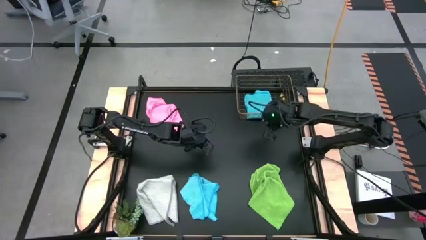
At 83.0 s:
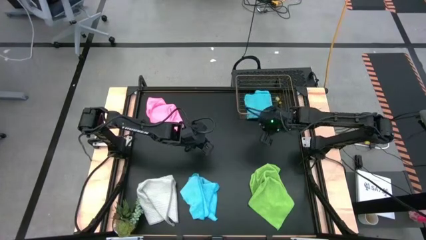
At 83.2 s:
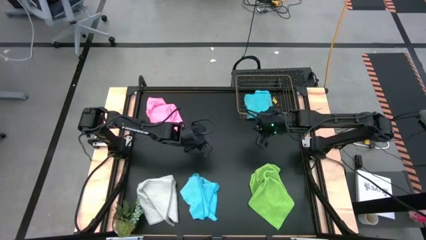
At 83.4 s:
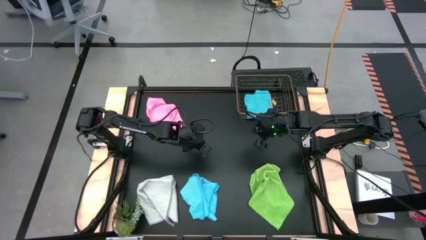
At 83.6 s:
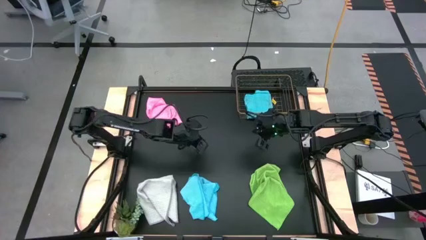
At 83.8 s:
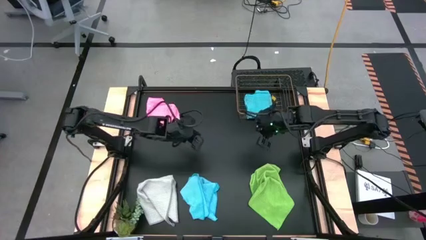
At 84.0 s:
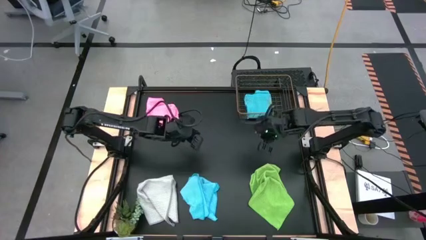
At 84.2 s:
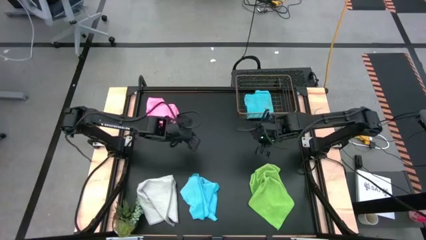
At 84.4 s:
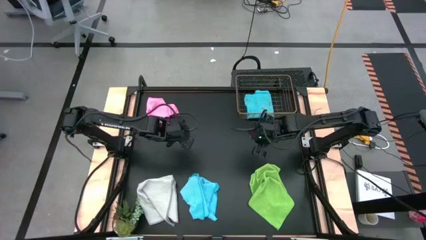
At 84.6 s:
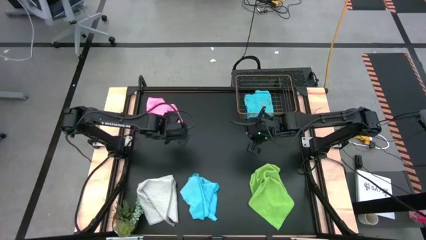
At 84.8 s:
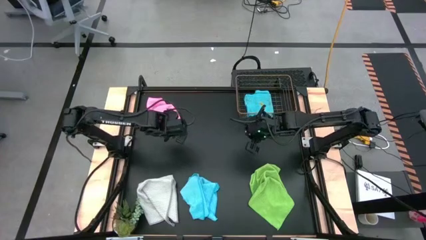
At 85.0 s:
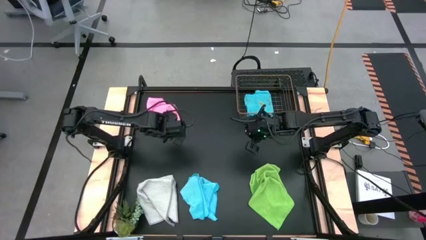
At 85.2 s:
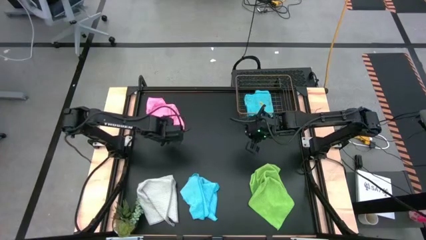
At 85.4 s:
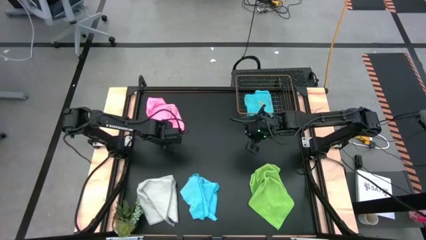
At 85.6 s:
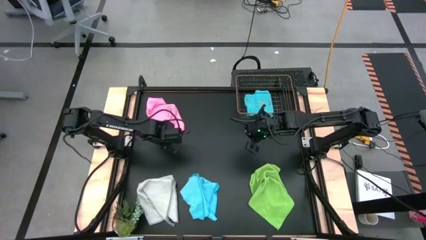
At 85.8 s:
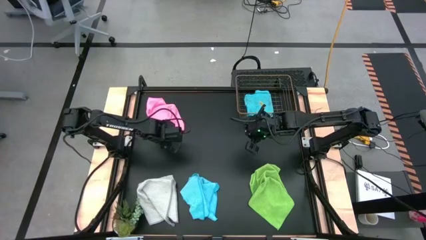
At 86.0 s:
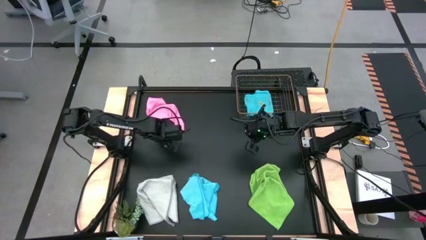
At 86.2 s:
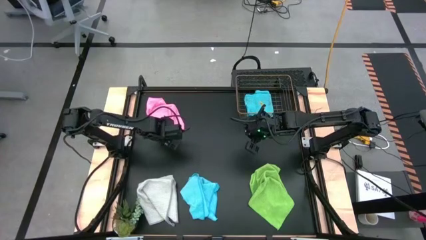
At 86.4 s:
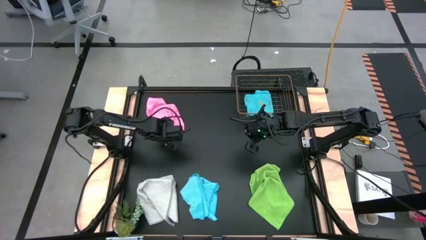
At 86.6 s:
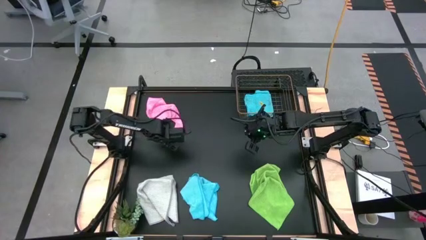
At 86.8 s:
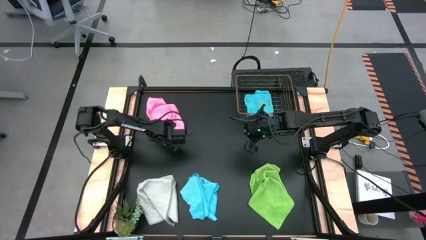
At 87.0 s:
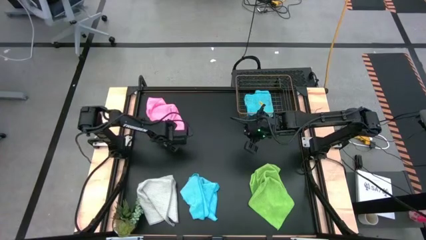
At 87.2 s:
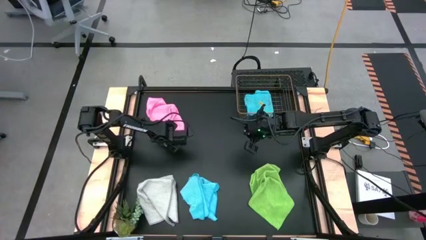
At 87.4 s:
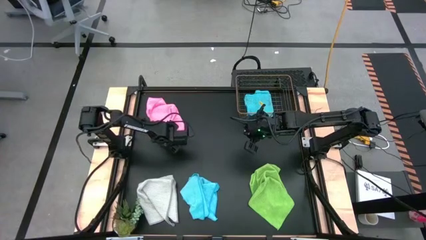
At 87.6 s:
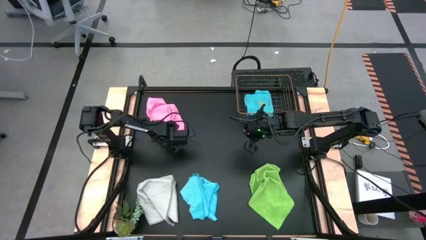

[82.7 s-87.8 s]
Task: Fold microfiber towels
Fold the pink towel

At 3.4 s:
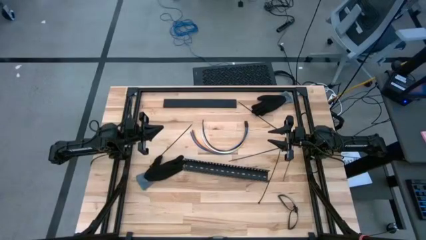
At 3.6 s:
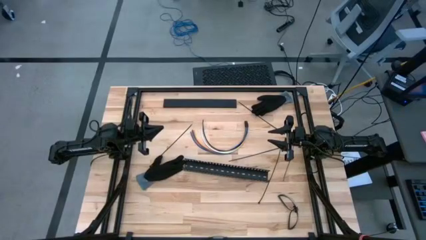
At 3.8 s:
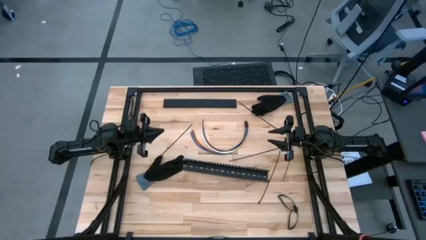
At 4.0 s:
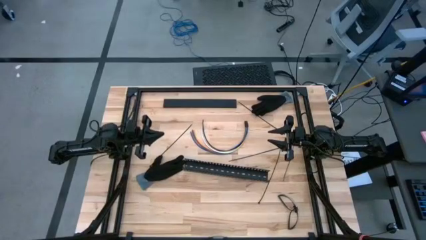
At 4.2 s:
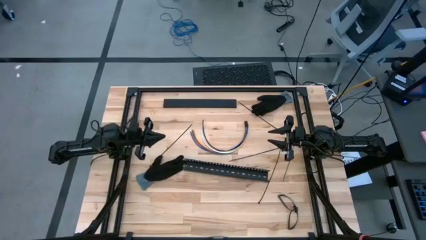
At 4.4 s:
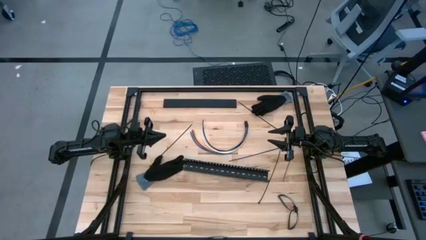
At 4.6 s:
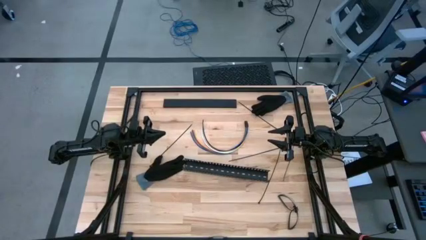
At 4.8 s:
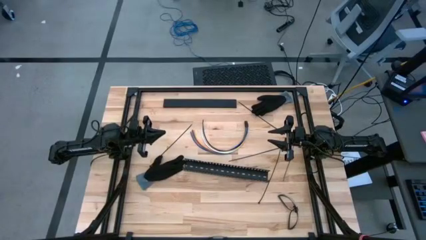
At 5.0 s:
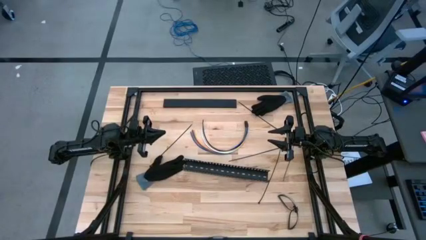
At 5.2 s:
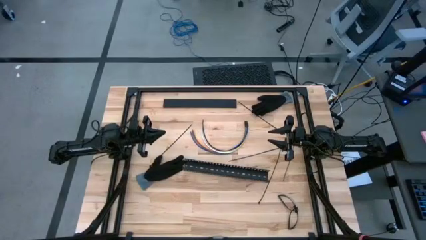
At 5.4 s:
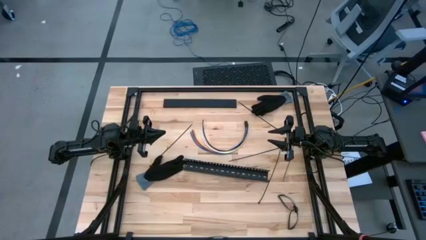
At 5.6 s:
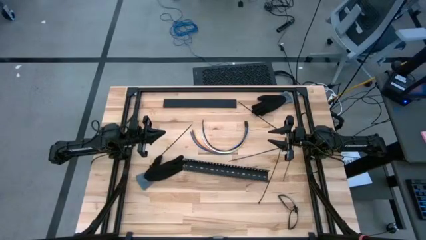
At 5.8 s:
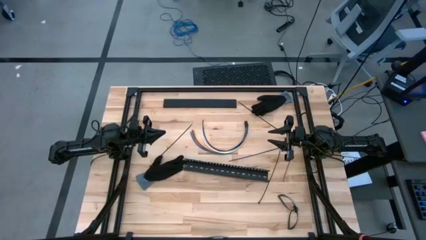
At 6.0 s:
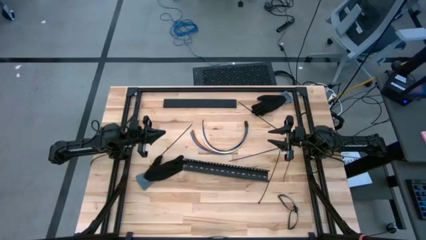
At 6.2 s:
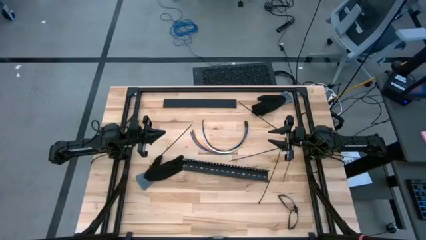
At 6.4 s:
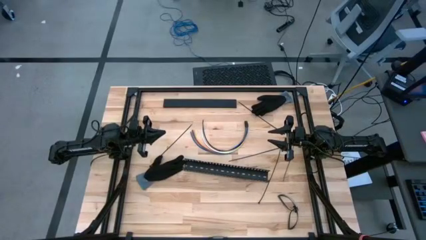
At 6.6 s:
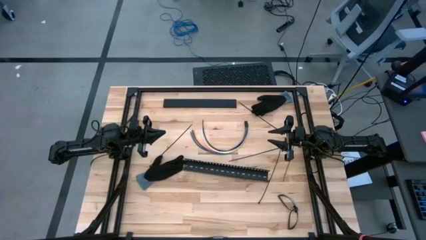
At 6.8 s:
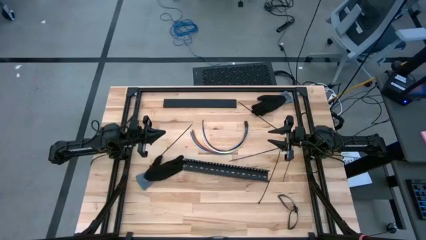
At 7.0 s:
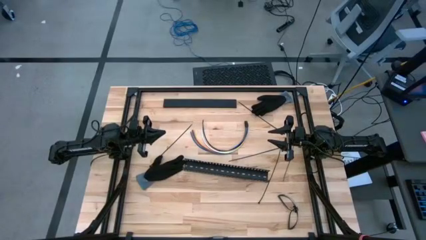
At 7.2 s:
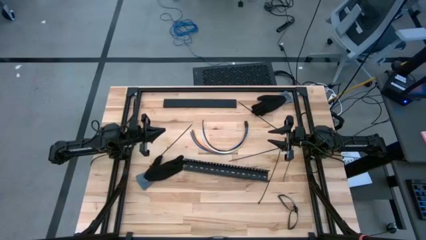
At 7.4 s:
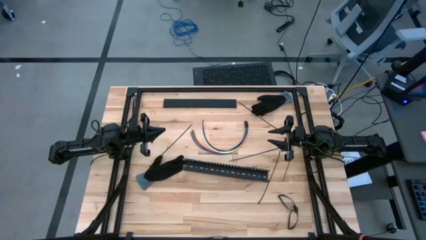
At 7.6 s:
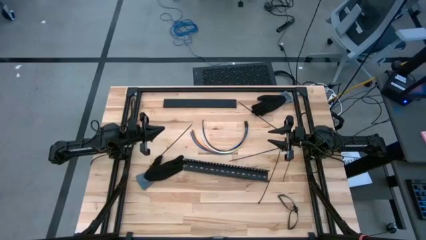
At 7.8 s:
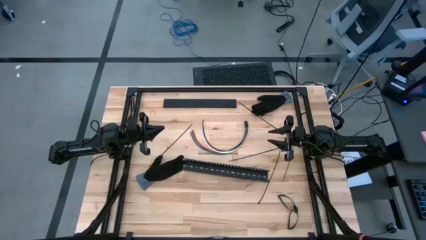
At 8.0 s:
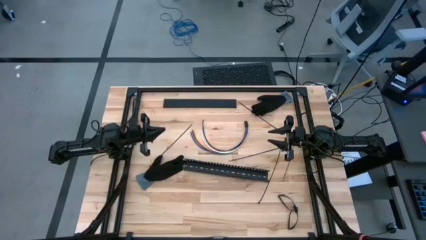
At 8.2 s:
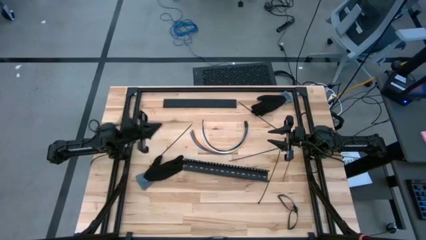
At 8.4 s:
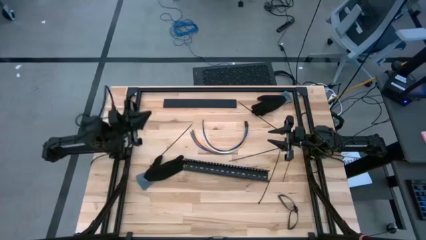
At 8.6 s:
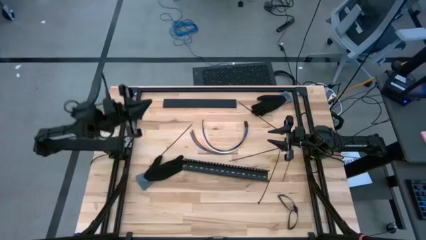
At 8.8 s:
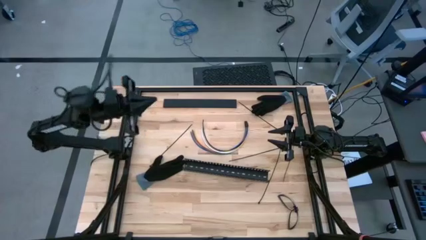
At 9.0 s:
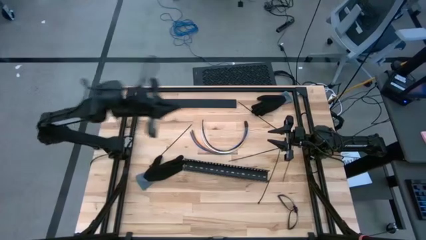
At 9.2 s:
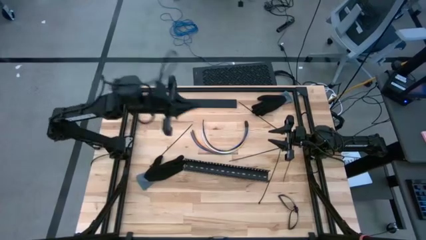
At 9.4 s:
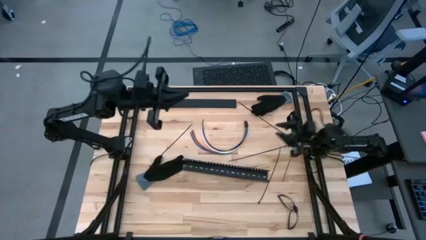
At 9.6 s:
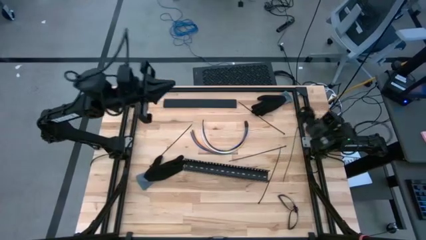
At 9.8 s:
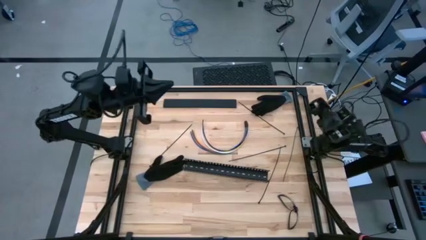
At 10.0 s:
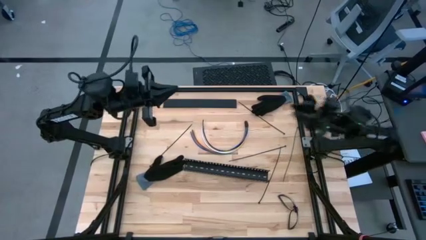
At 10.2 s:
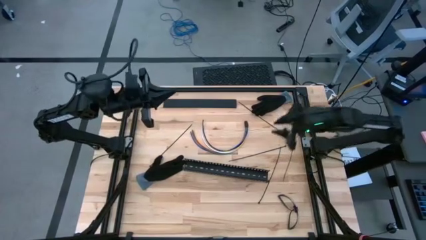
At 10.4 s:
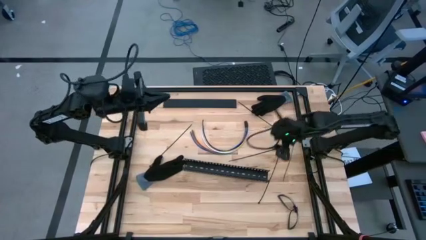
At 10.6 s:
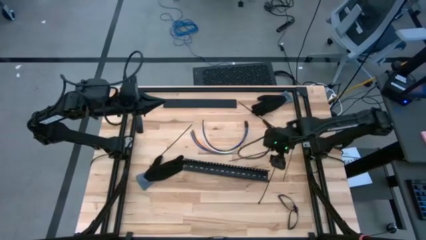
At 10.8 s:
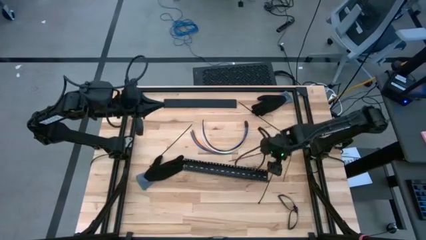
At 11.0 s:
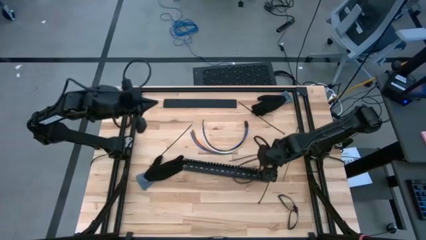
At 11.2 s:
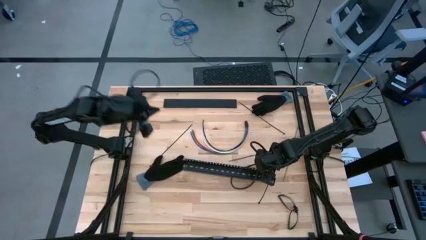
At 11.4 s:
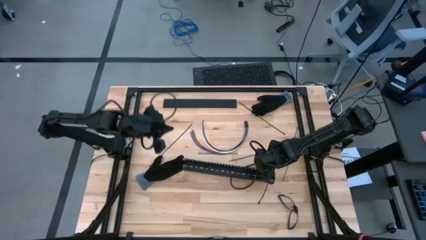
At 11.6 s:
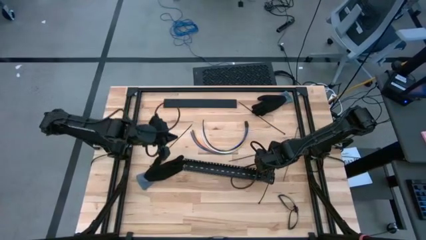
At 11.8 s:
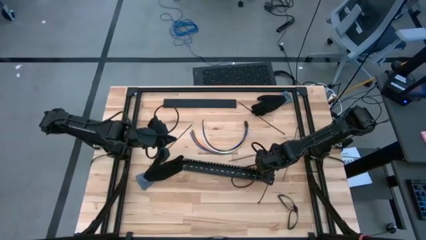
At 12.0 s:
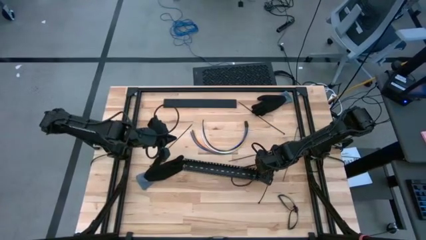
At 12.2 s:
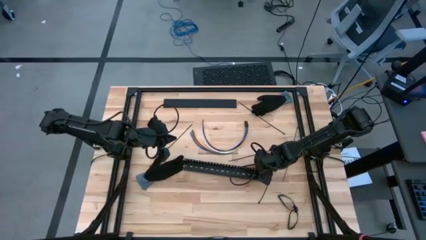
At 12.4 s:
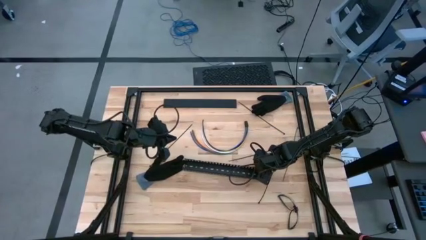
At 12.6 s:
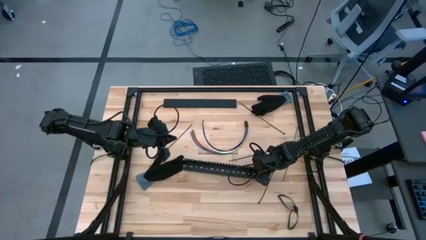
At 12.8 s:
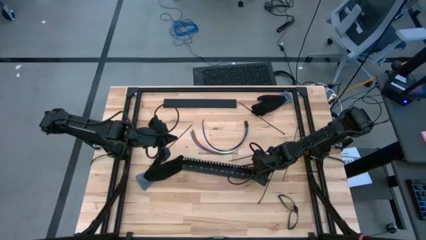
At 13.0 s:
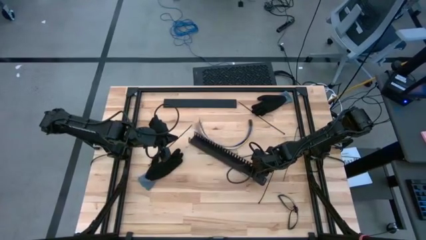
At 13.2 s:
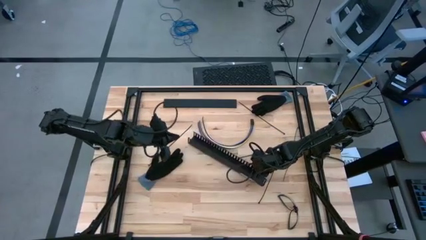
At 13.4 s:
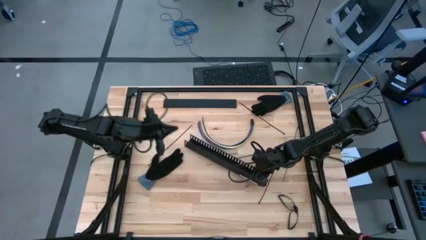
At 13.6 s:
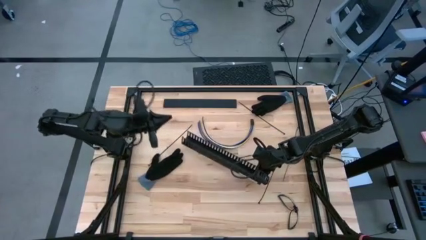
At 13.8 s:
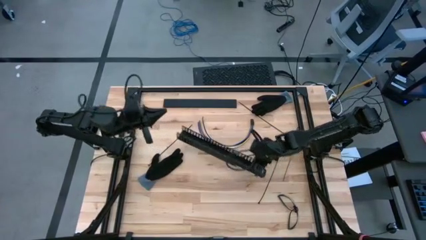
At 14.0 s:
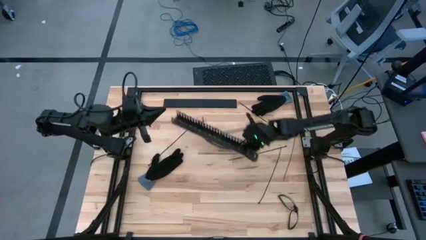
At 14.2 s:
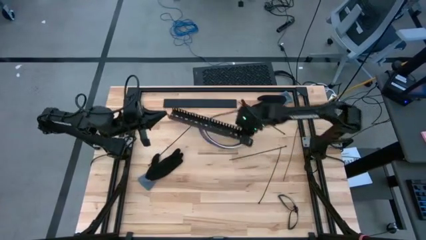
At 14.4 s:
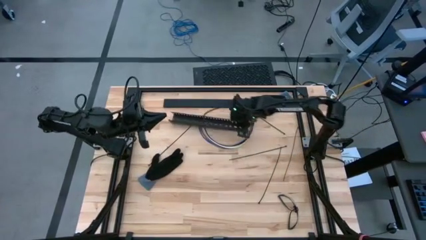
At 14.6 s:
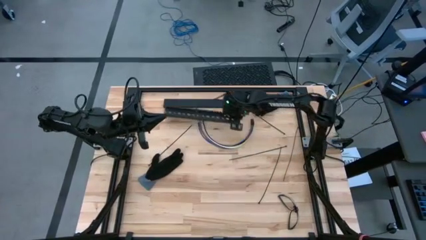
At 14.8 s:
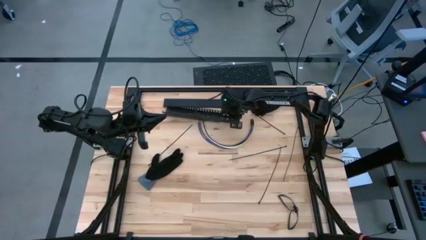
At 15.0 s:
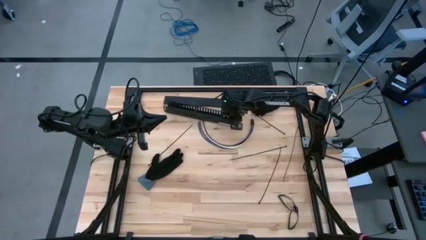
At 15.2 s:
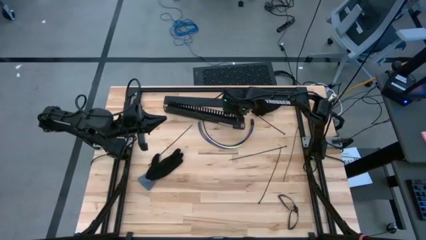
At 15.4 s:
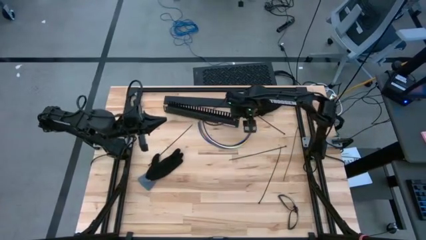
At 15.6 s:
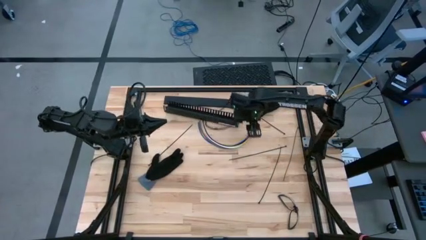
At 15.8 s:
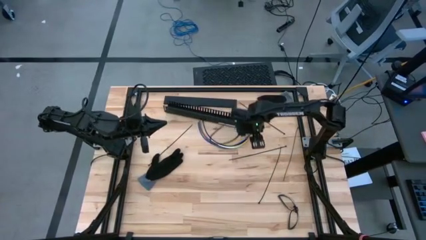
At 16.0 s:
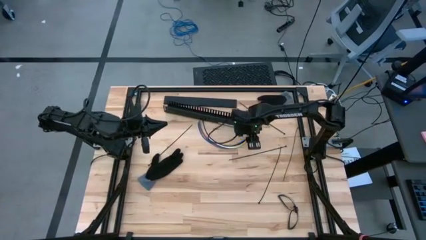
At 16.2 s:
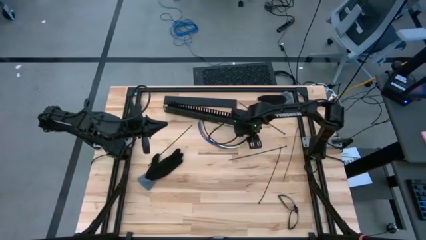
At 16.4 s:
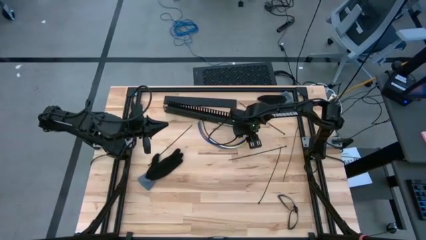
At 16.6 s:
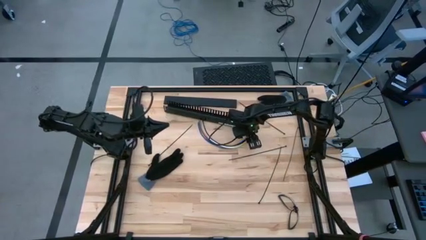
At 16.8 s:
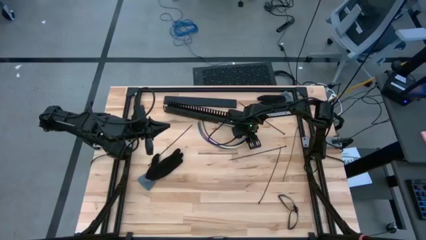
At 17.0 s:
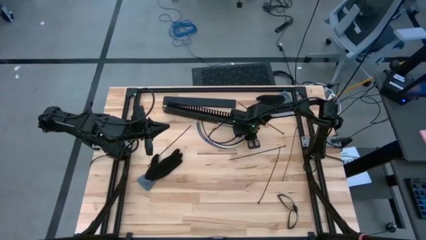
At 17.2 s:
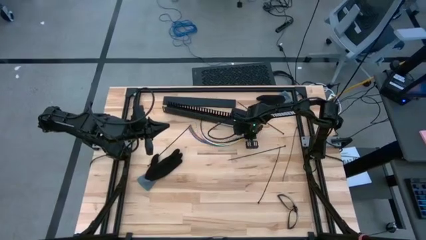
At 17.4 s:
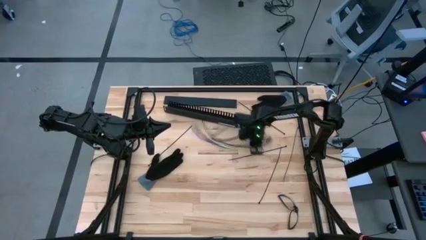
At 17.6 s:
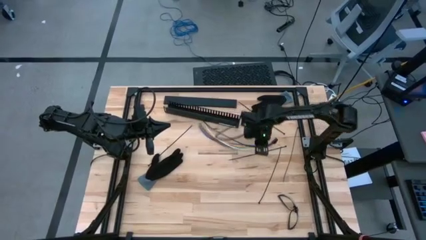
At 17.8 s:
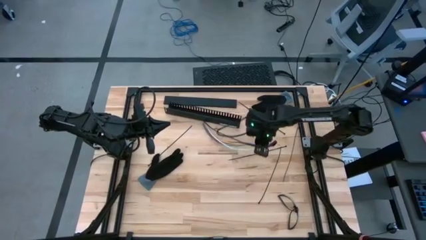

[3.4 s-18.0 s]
Task: Ziptie cables
Prepare the zip tie
